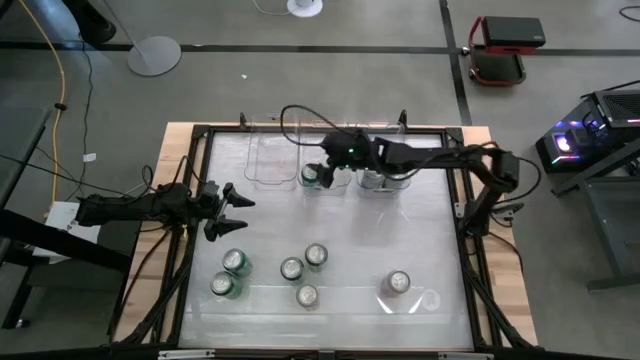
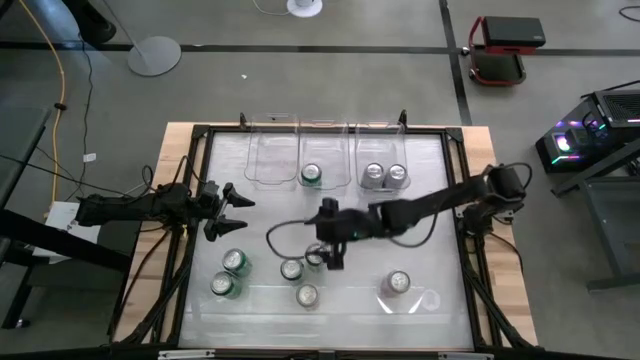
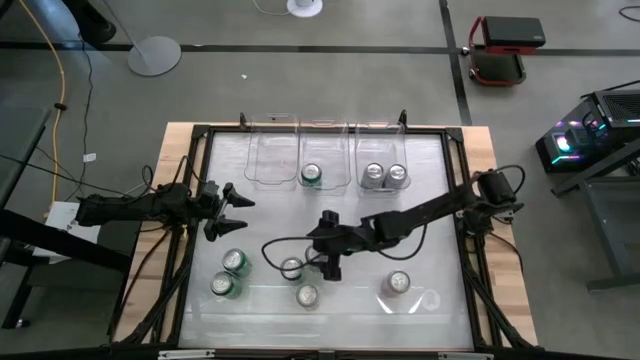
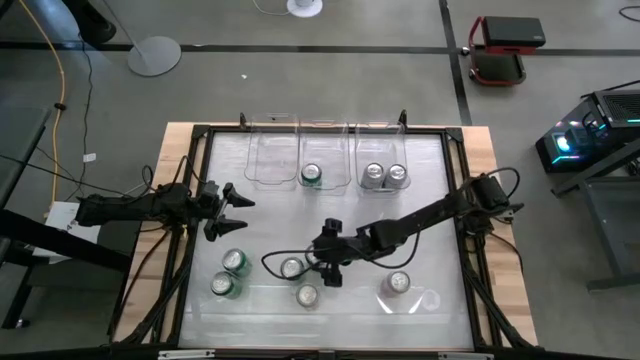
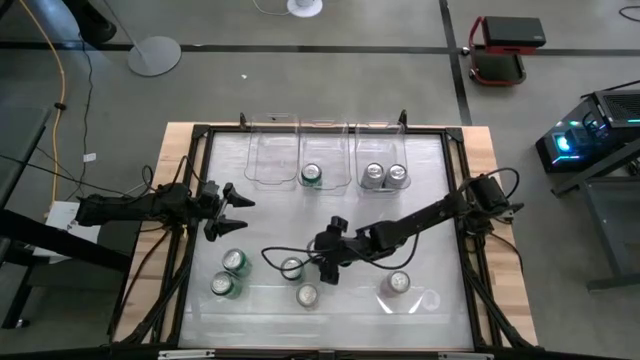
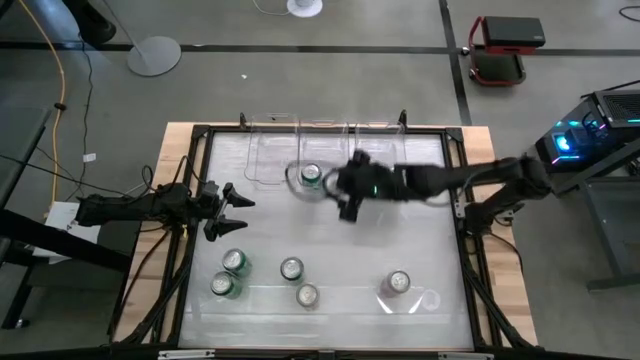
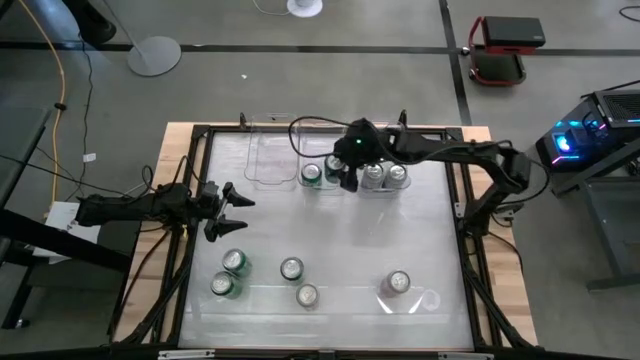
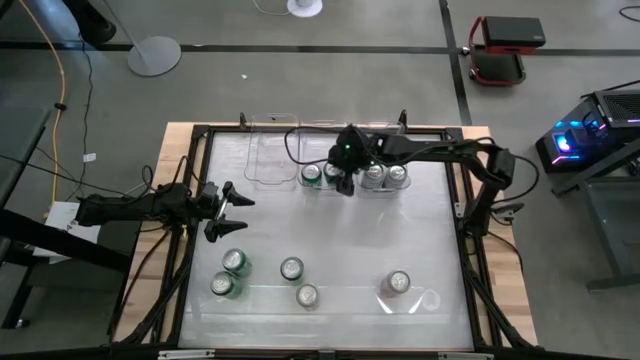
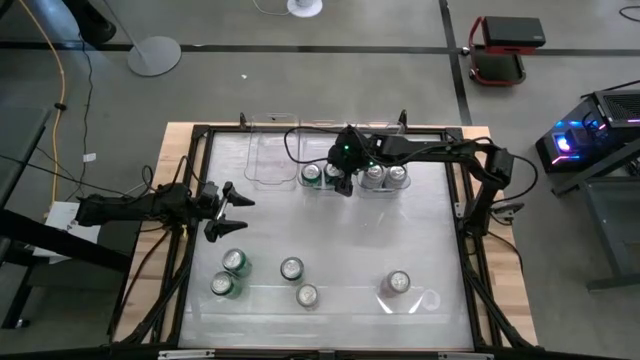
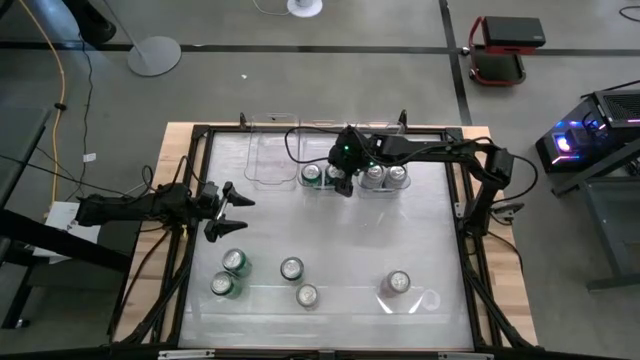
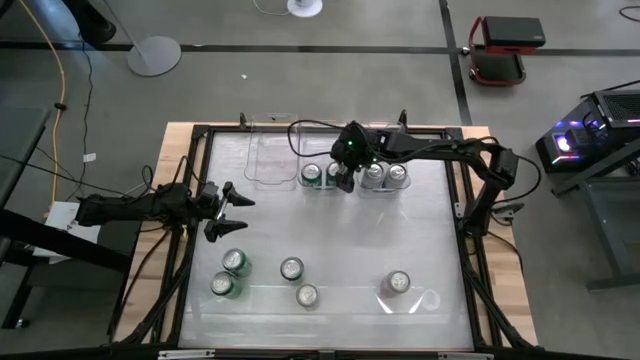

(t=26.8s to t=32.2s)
Task: Sort soda cans
Put the green soda can into the middle transparent bin

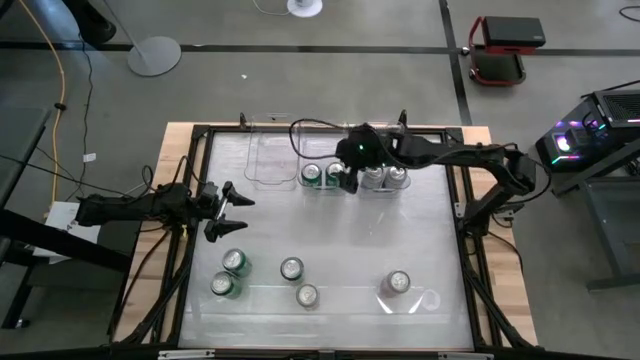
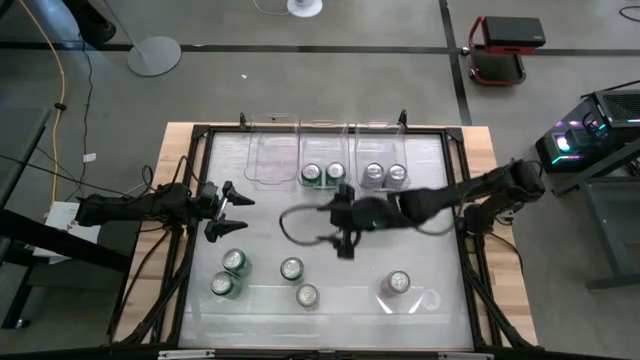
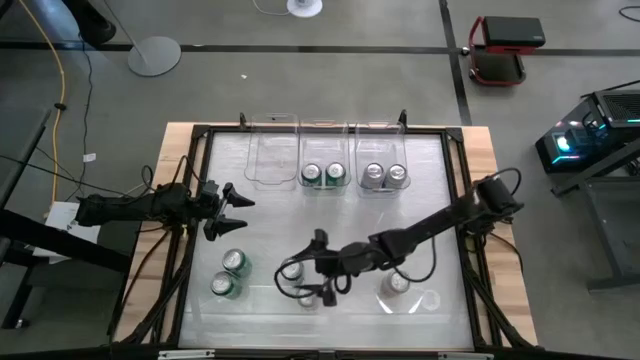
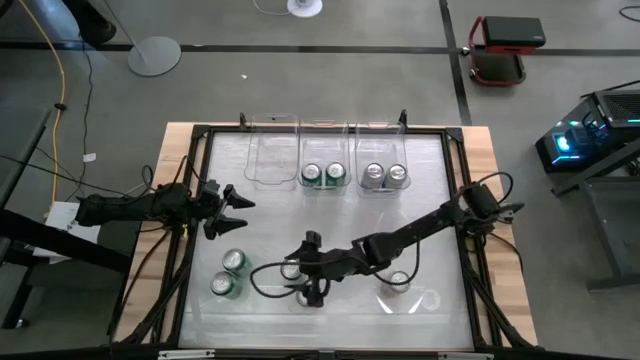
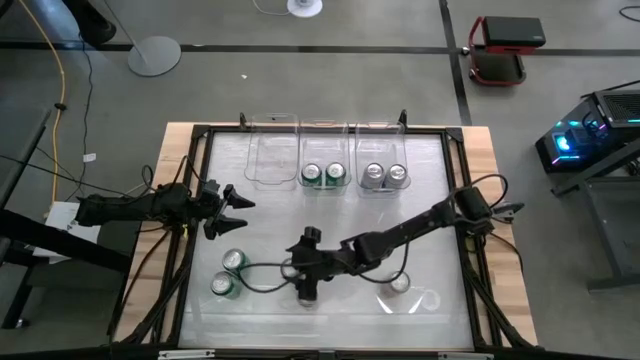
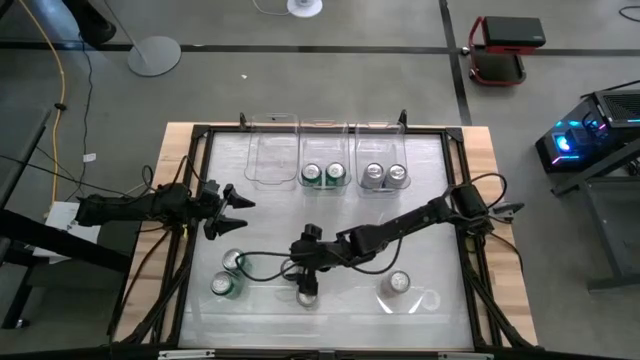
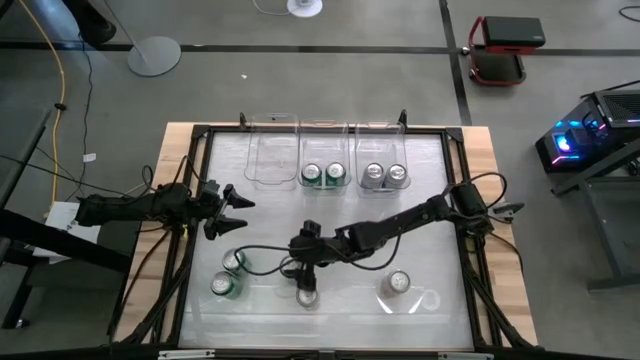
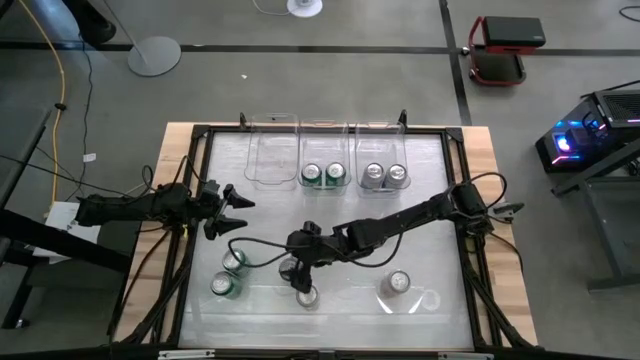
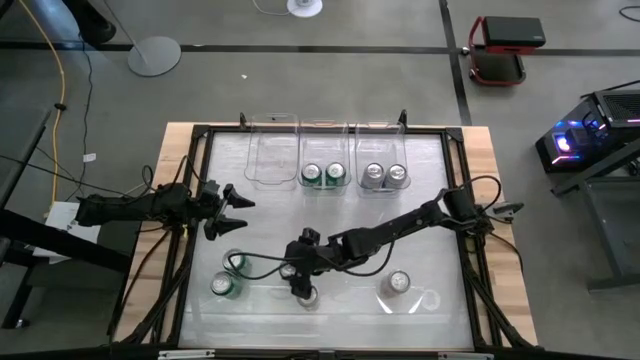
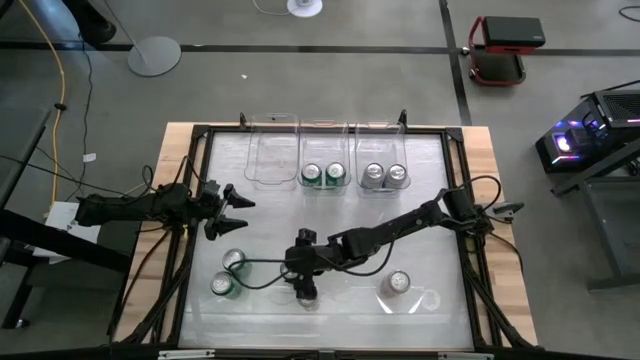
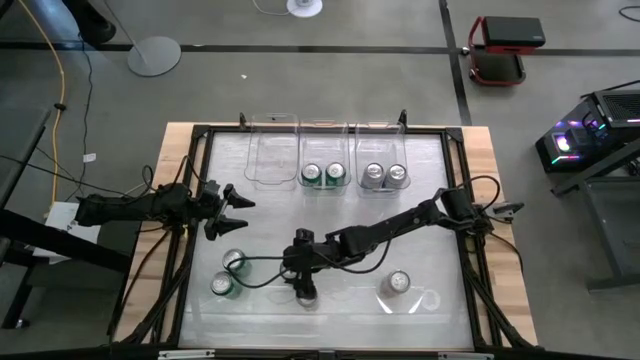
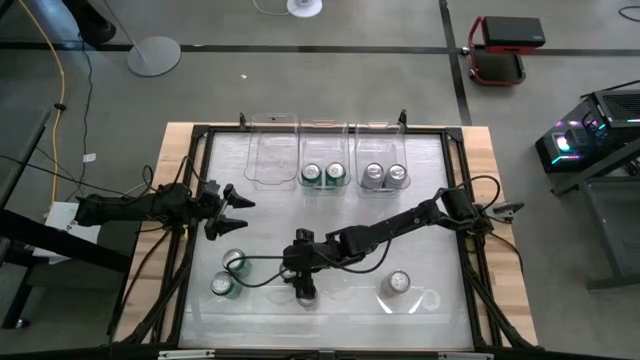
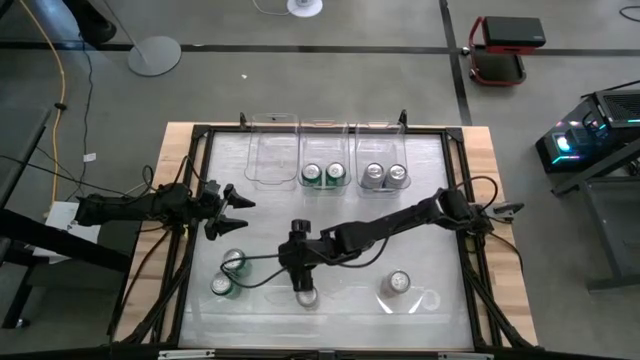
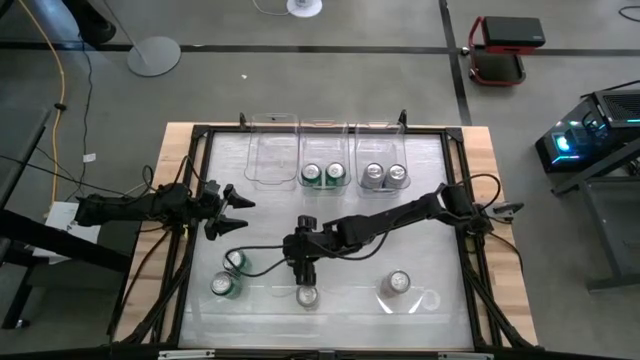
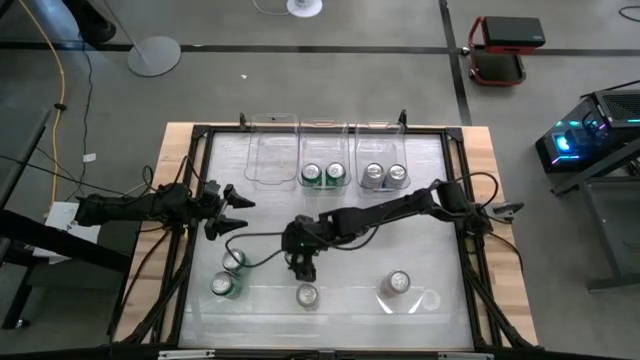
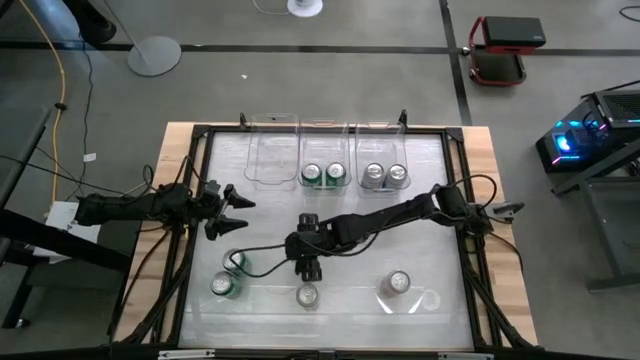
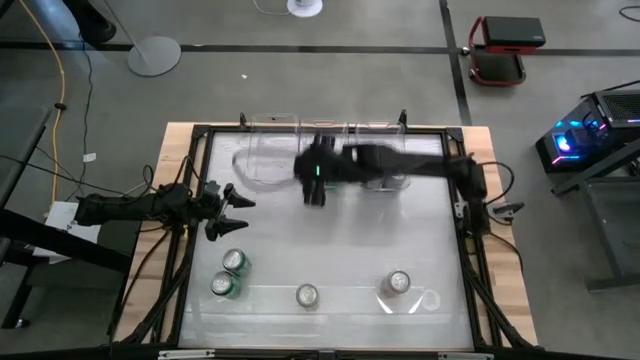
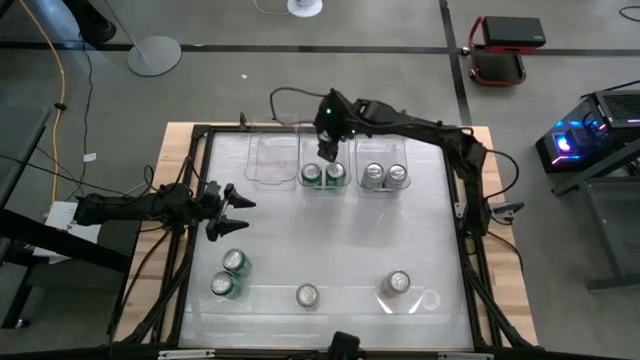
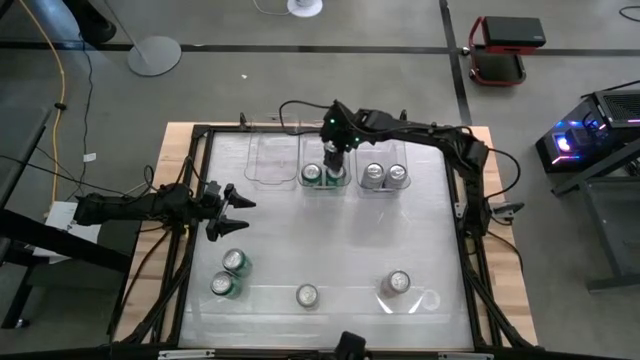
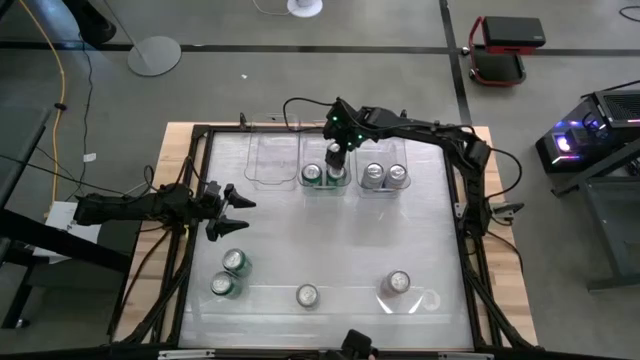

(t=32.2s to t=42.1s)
Put the green soda can into the middle transparent bin

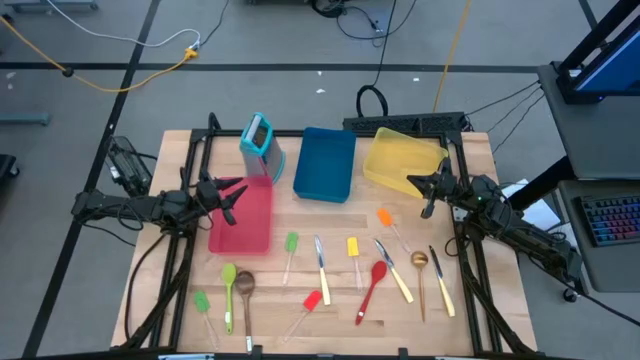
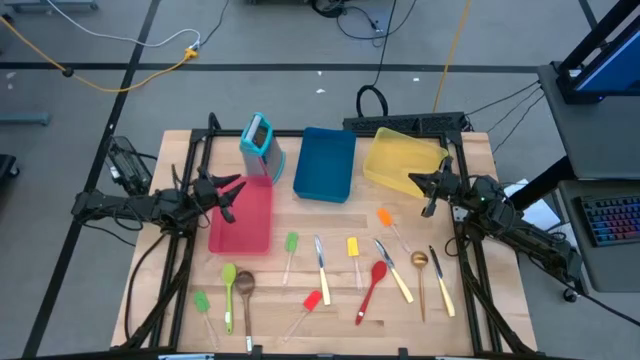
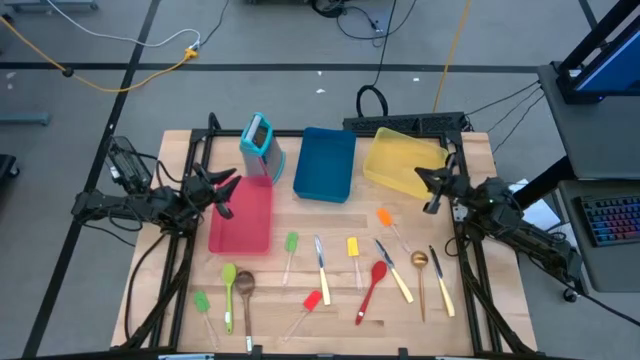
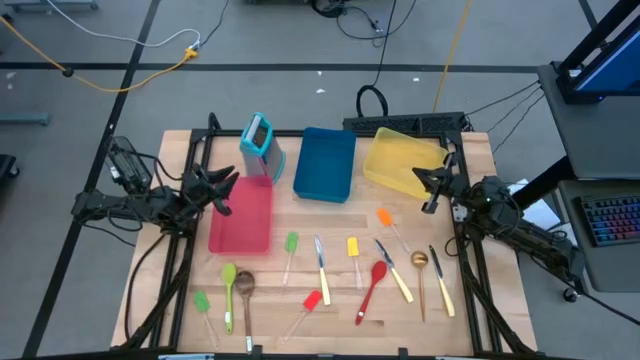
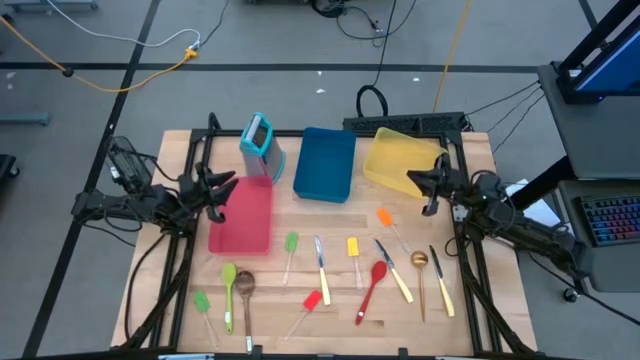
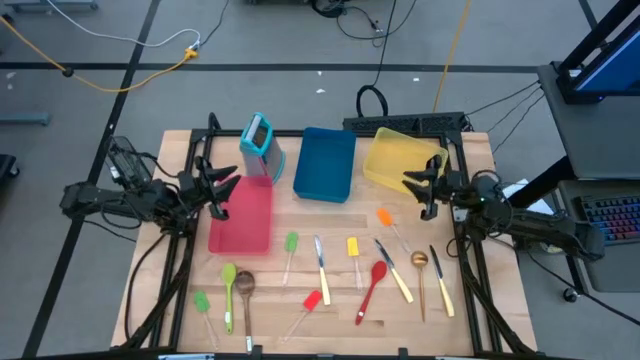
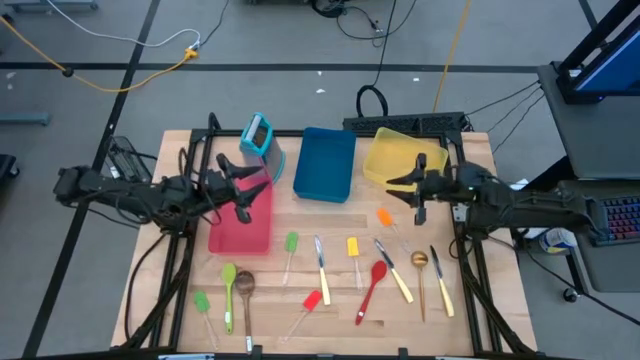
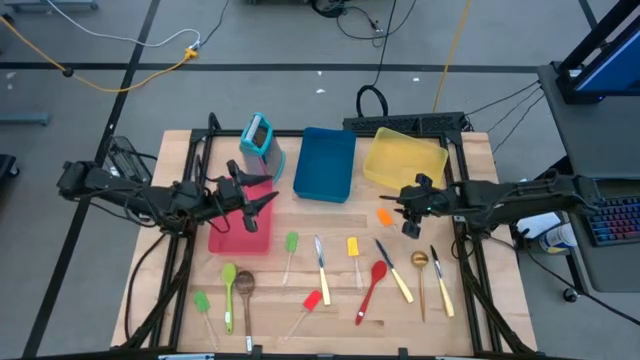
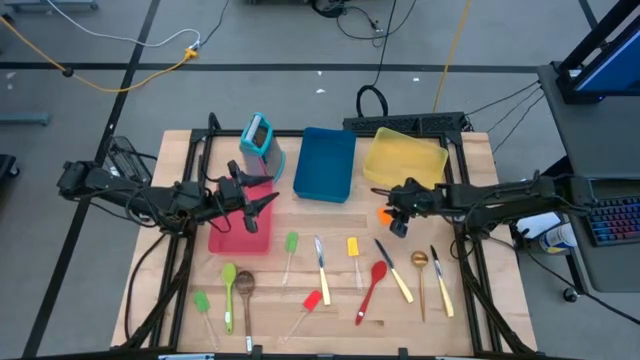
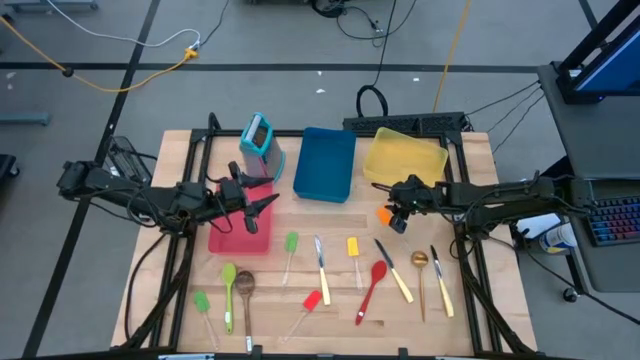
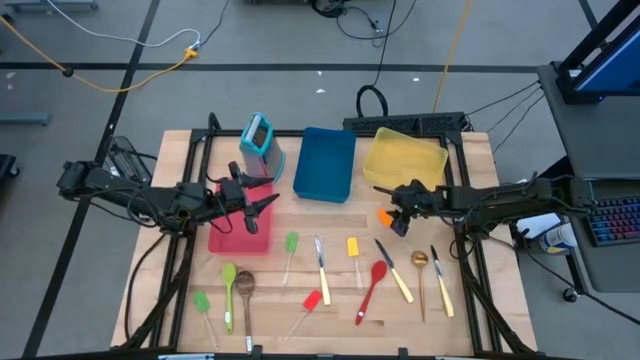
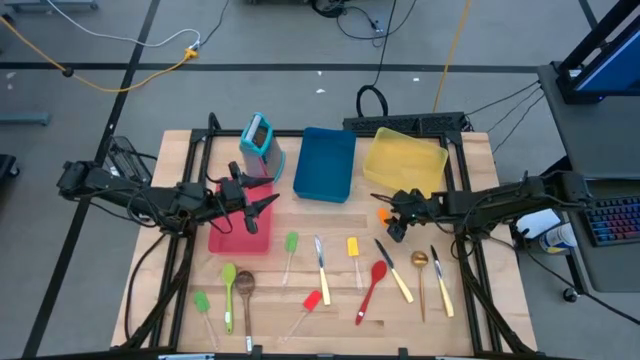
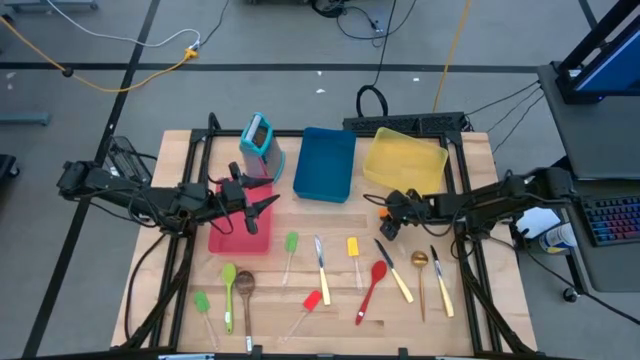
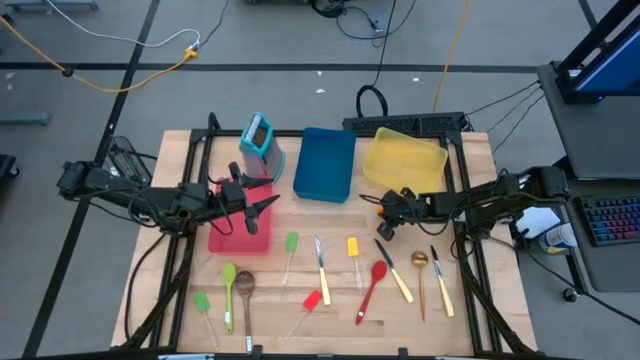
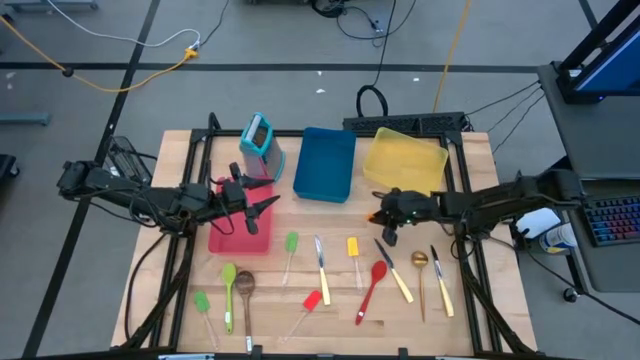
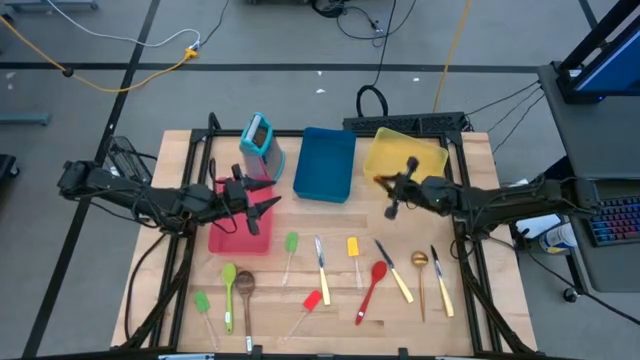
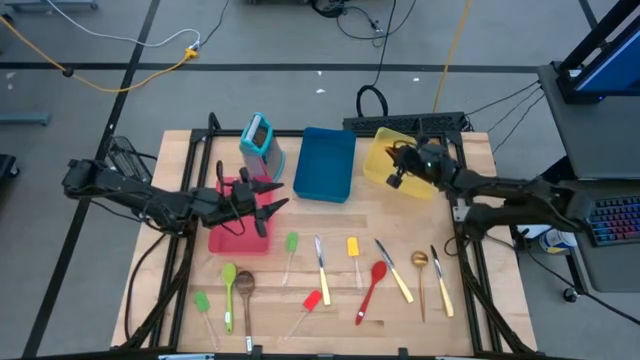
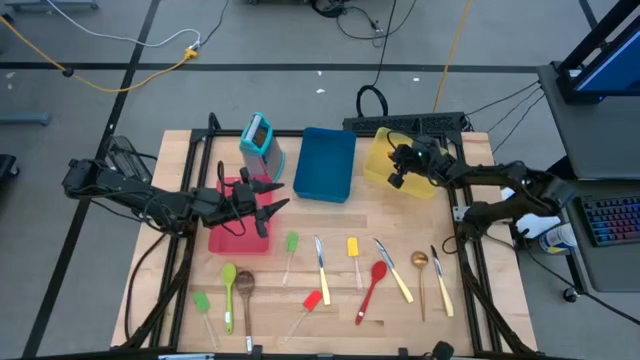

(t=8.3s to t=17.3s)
Task: Pick & Place Kitchen Items
Put the orange spatula into the yellow bin
